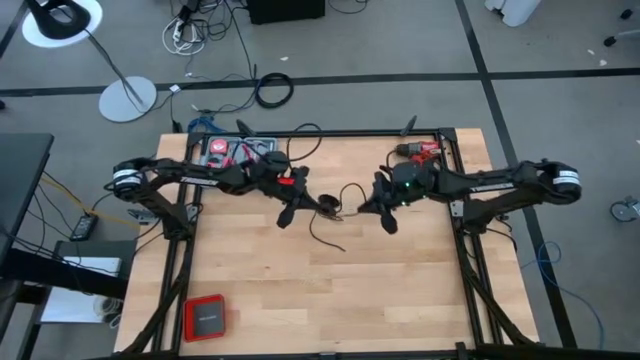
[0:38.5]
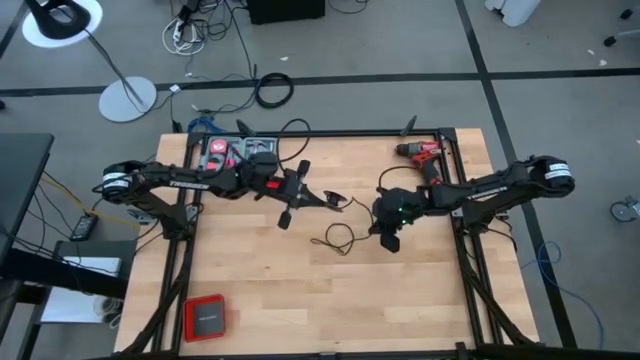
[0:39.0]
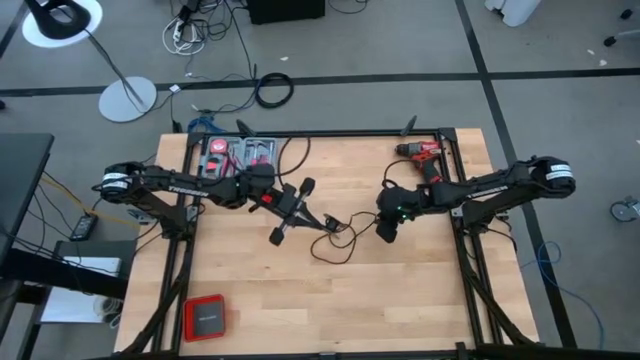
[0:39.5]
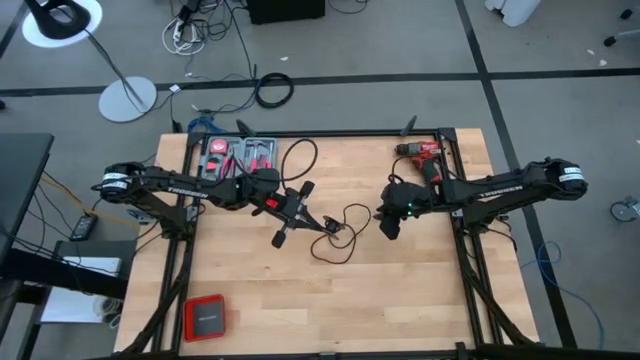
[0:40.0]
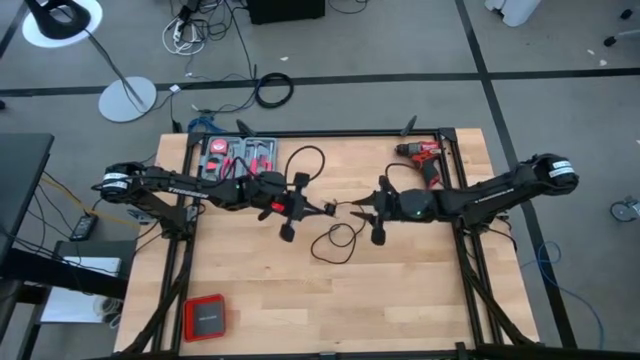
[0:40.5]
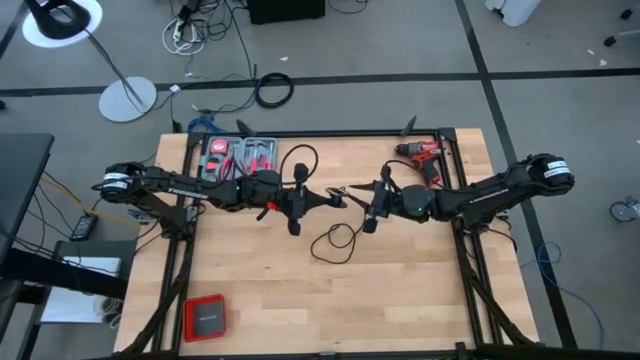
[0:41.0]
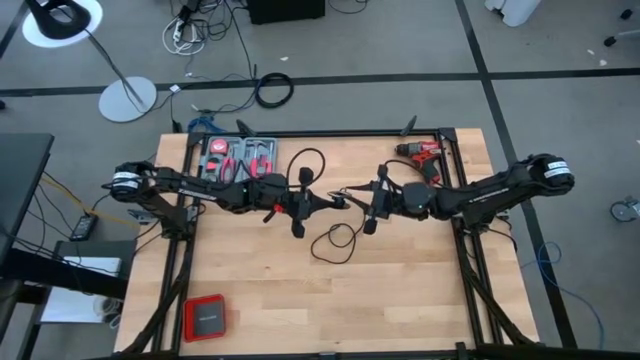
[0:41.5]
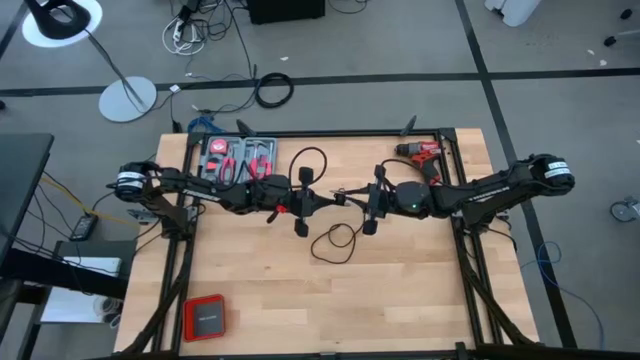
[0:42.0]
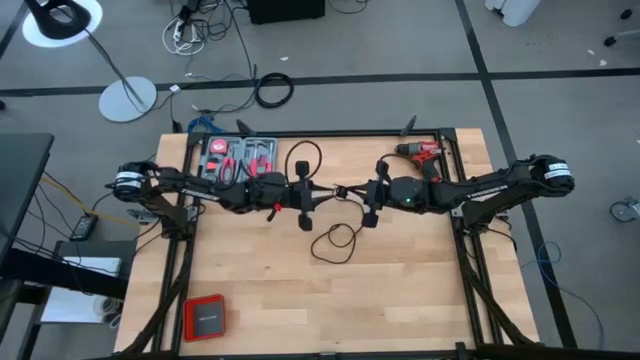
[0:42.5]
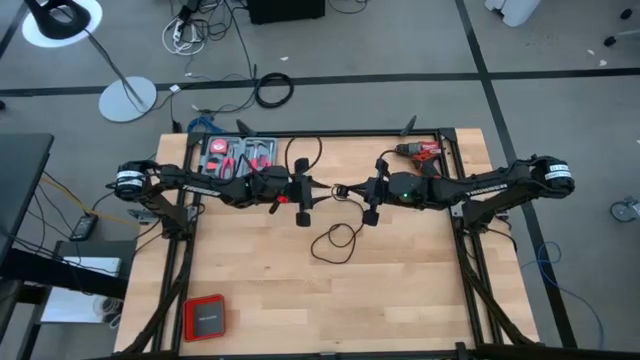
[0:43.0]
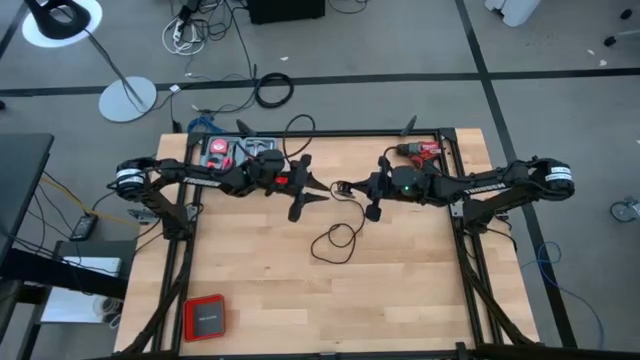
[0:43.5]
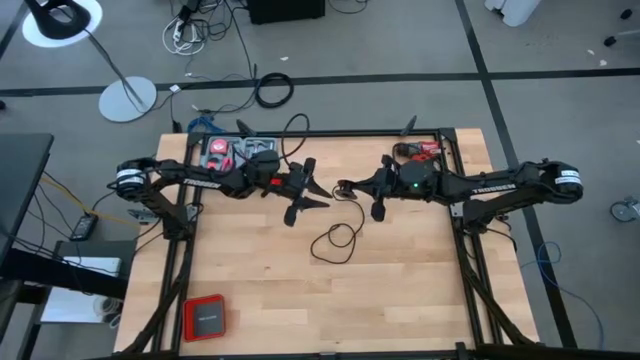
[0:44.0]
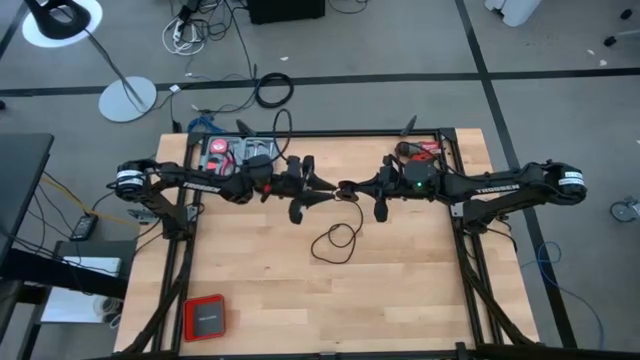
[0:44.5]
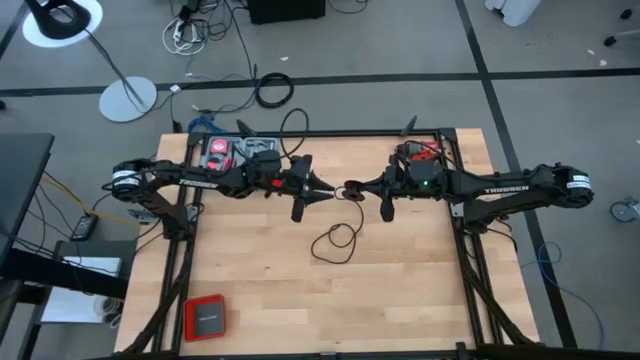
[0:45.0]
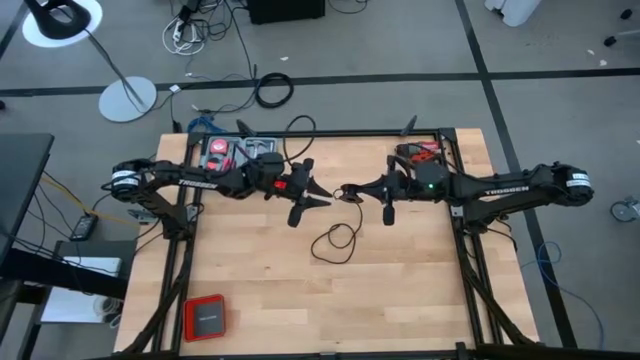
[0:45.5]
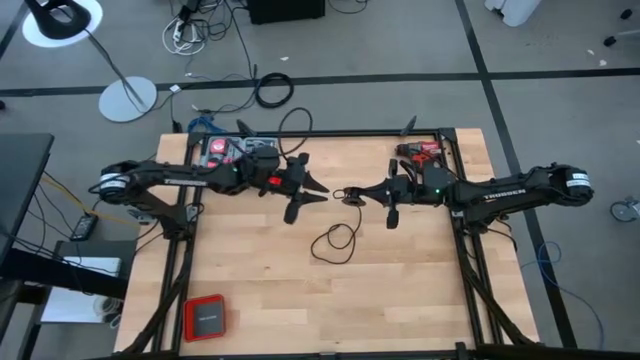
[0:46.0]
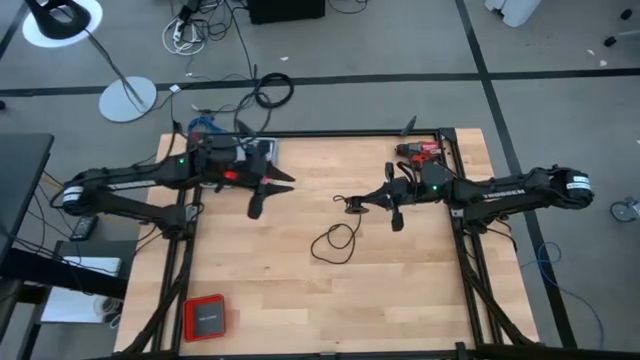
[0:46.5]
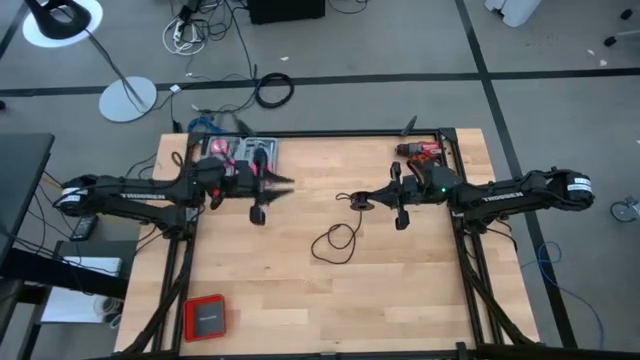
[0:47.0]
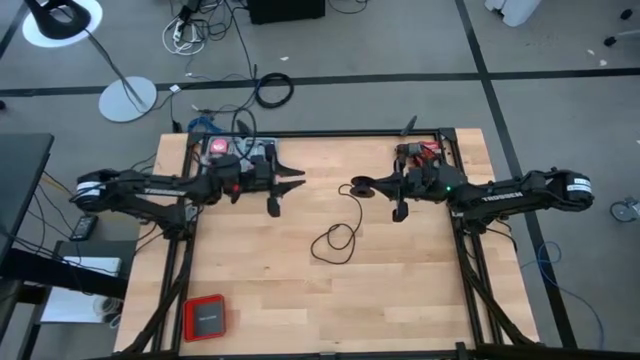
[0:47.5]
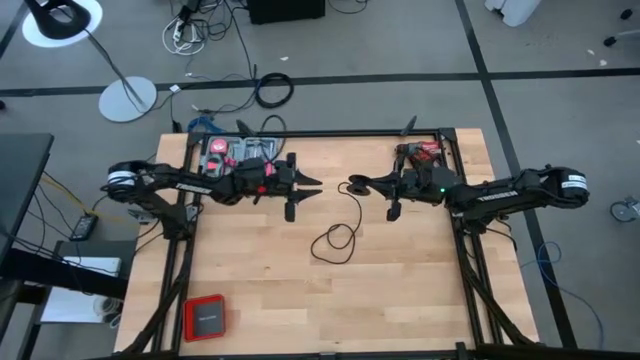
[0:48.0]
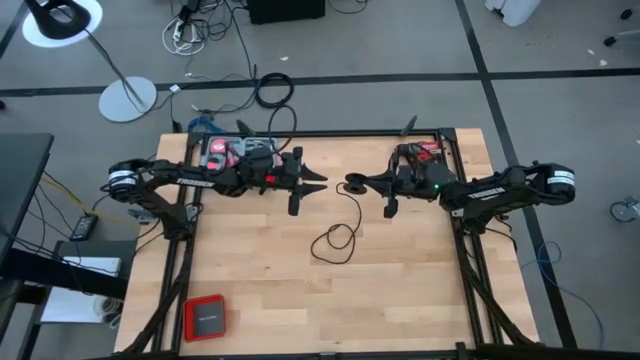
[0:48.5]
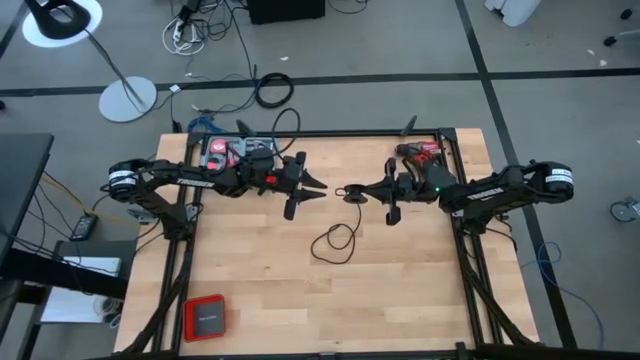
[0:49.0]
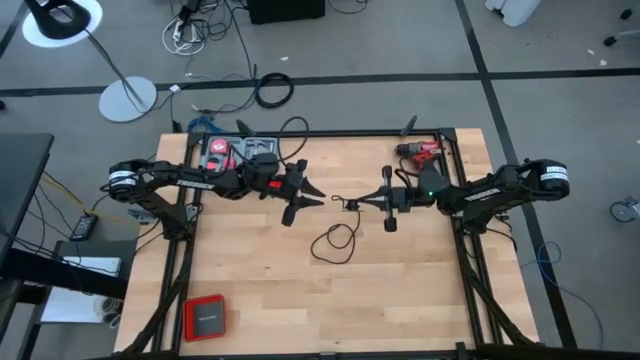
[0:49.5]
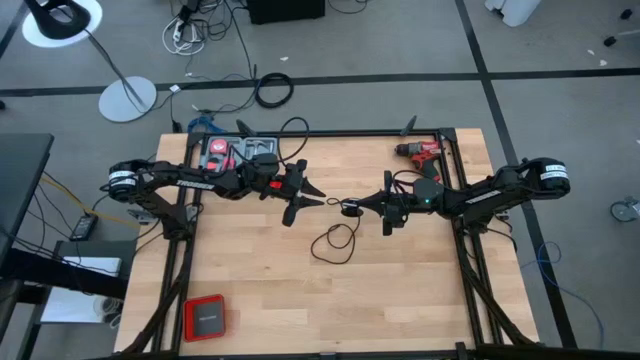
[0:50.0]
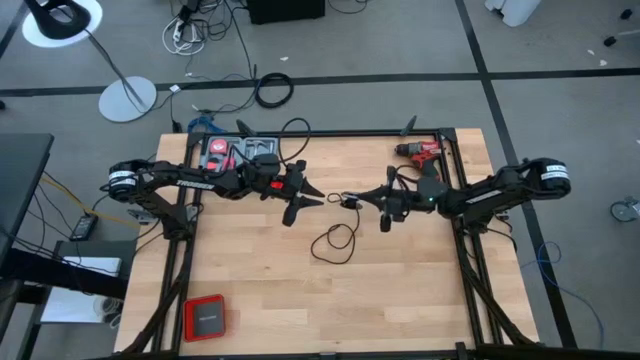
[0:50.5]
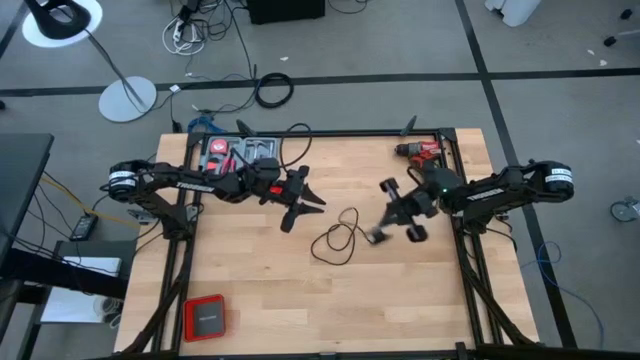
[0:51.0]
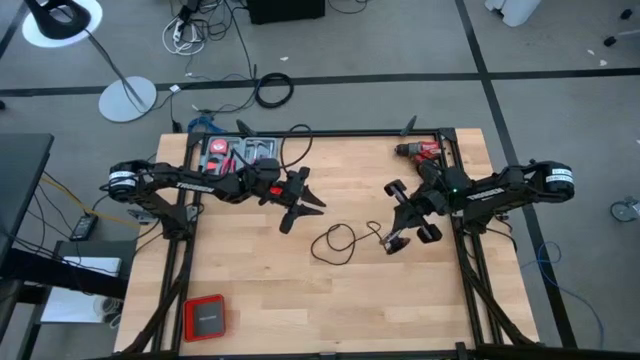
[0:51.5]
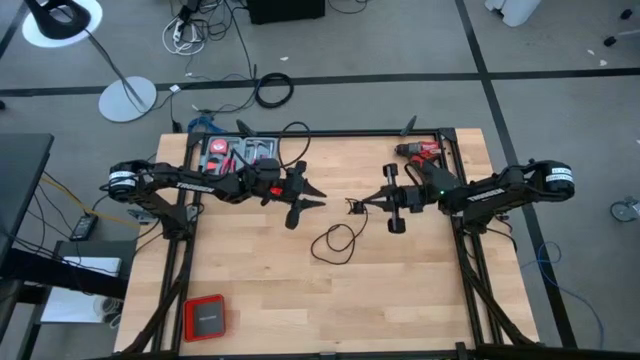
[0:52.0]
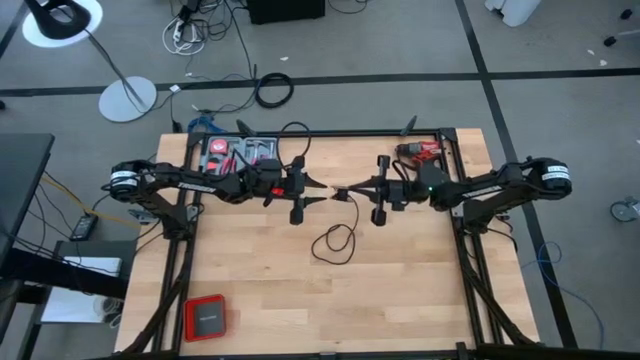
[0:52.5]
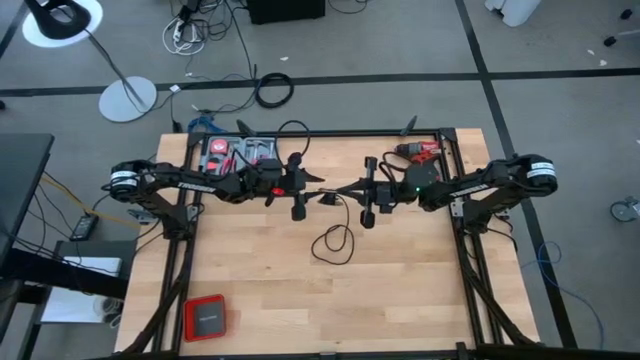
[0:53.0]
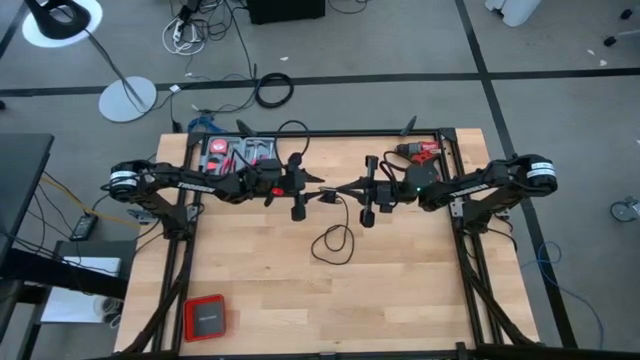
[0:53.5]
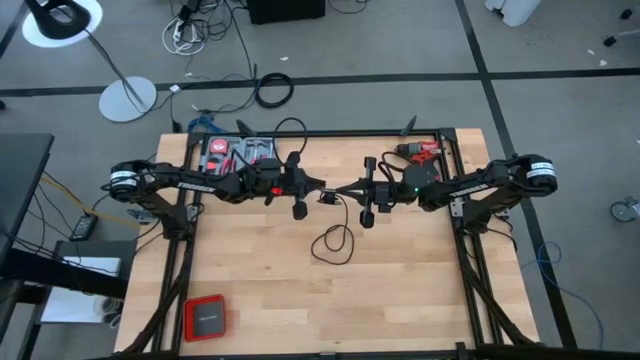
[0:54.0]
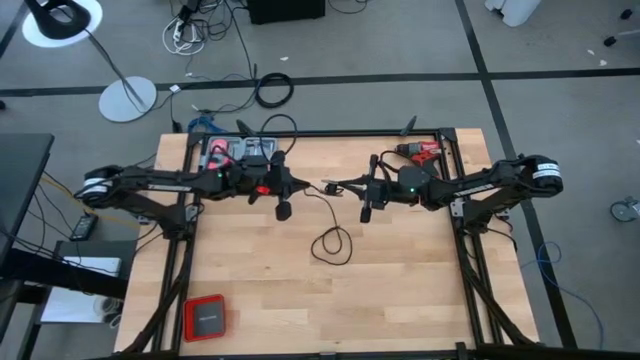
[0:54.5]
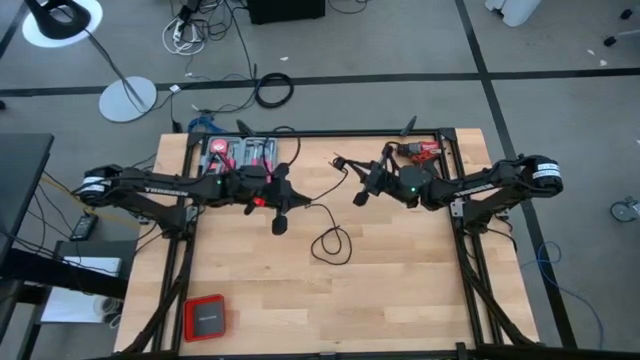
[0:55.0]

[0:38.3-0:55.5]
Task: Coil cords
Uncoil the black wire on the spool

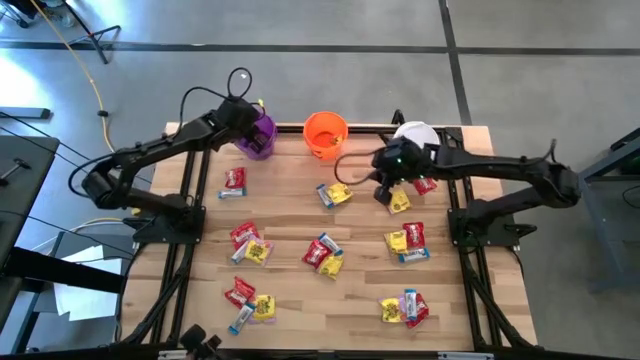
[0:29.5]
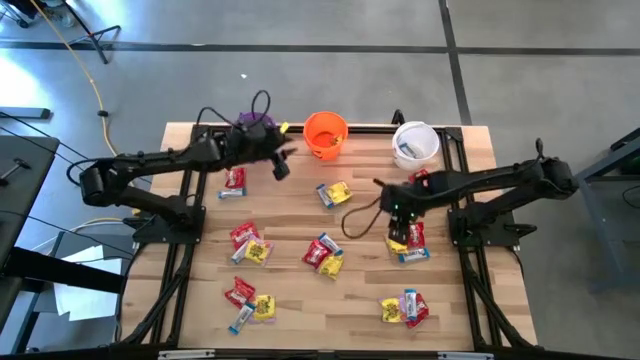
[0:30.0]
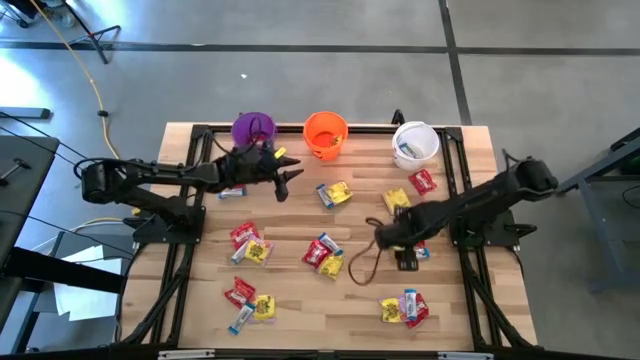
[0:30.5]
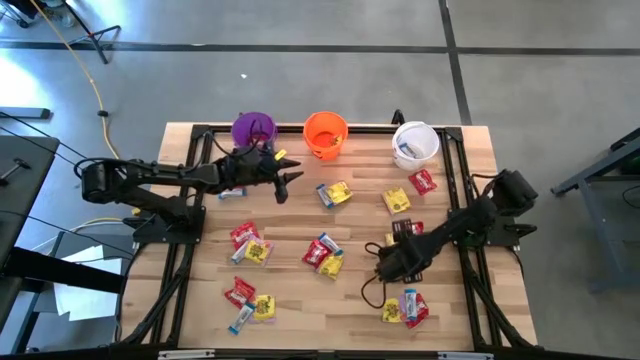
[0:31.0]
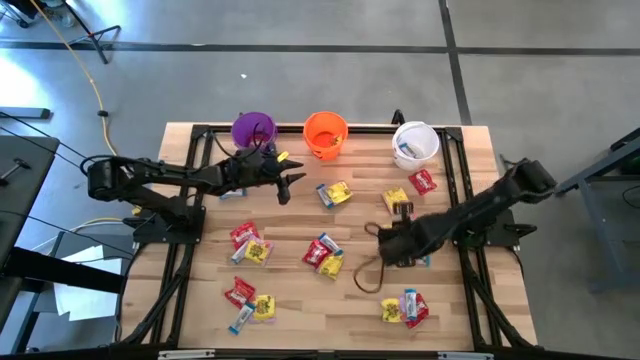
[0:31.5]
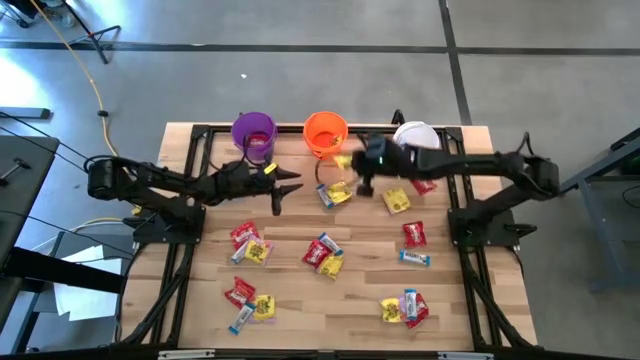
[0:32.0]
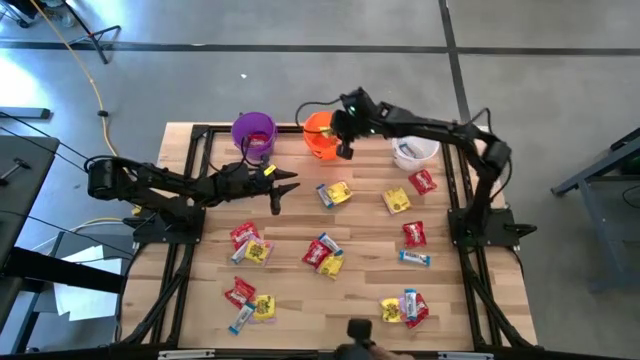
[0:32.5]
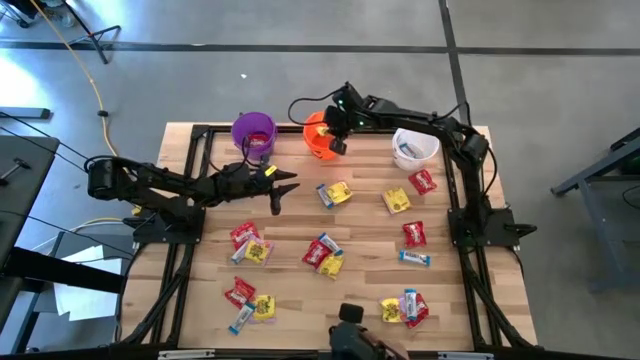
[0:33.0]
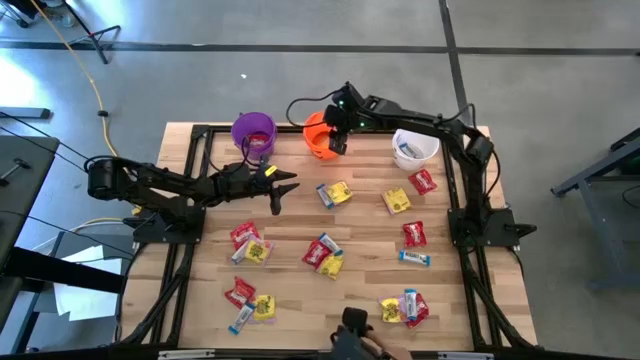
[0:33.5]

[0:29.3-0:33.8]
Task: Sort candy
Put the yellow candy into the orange bucket
